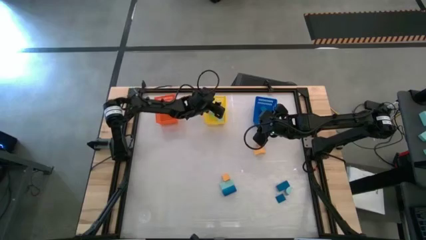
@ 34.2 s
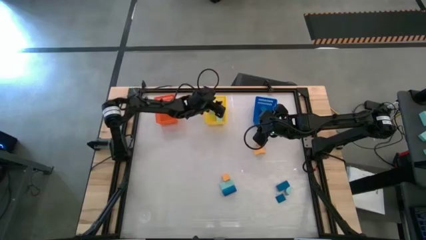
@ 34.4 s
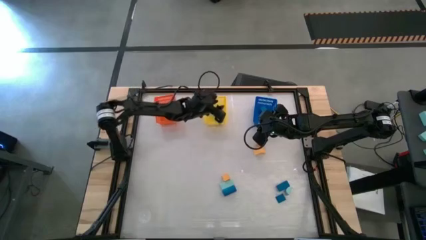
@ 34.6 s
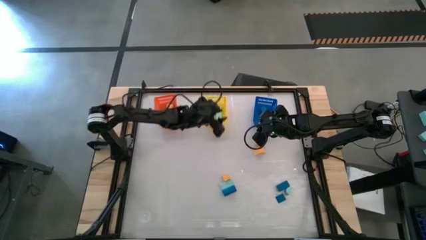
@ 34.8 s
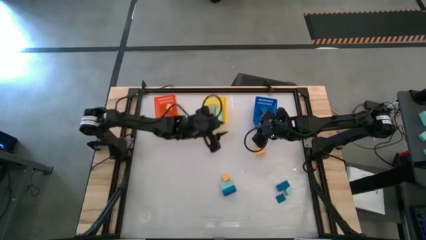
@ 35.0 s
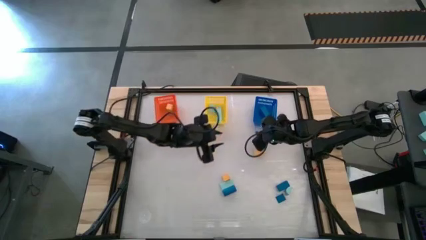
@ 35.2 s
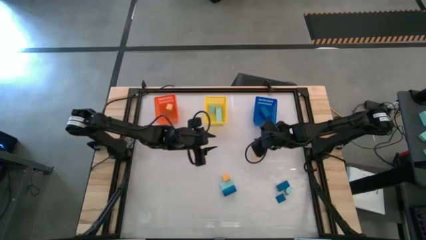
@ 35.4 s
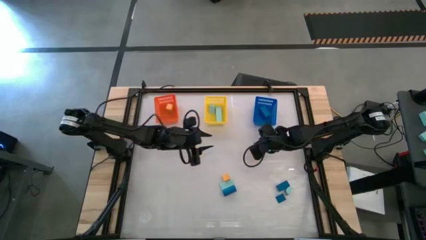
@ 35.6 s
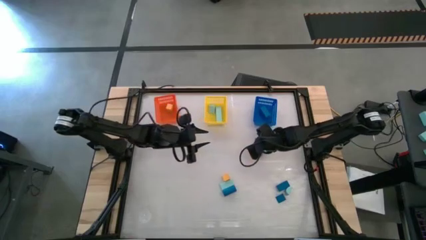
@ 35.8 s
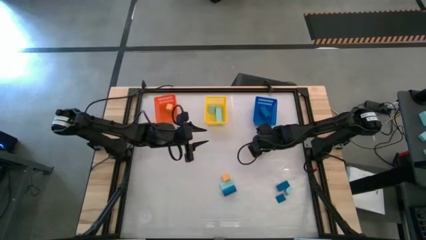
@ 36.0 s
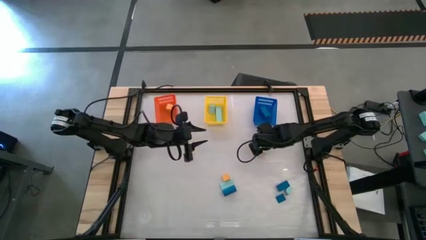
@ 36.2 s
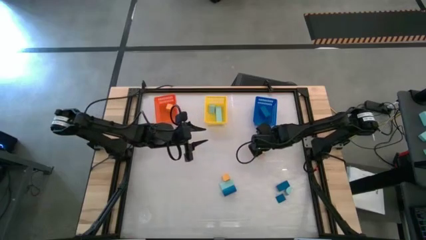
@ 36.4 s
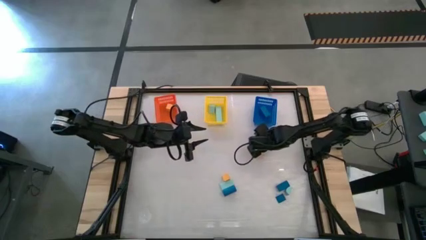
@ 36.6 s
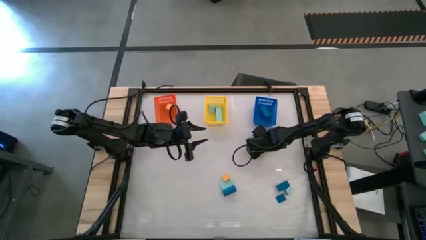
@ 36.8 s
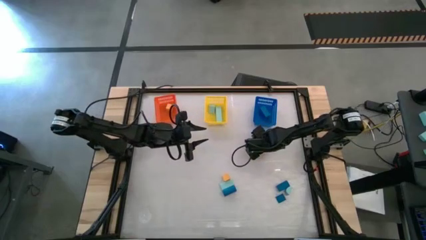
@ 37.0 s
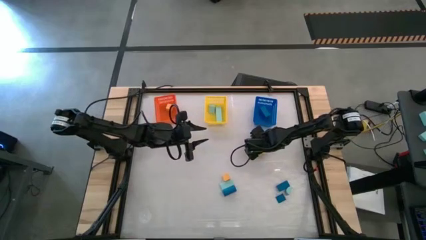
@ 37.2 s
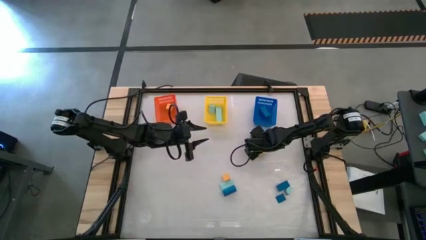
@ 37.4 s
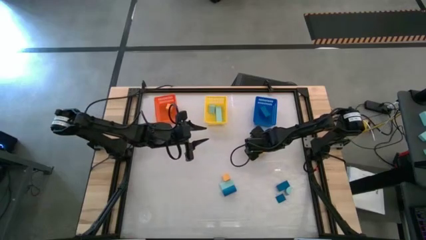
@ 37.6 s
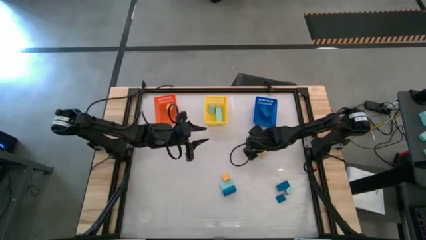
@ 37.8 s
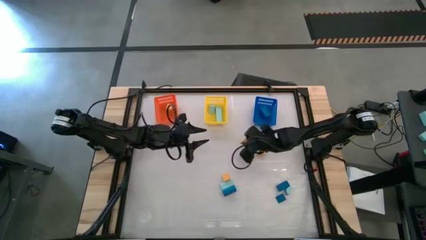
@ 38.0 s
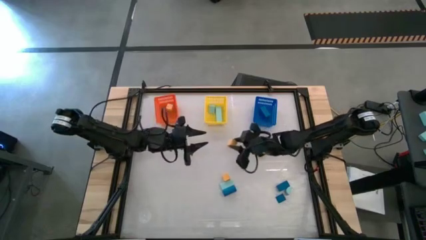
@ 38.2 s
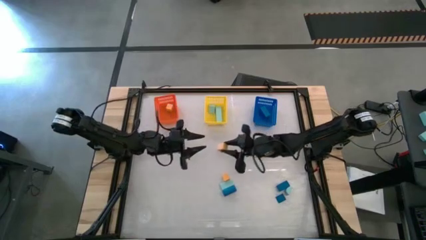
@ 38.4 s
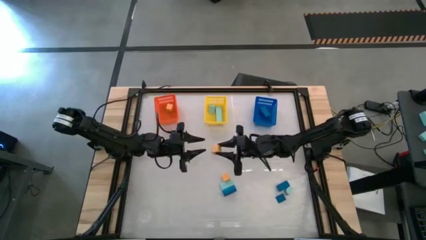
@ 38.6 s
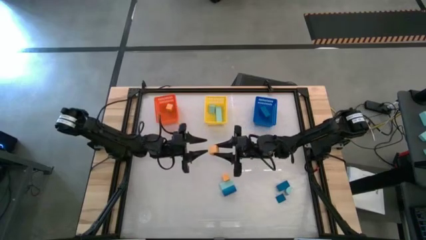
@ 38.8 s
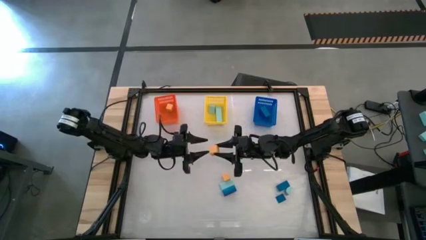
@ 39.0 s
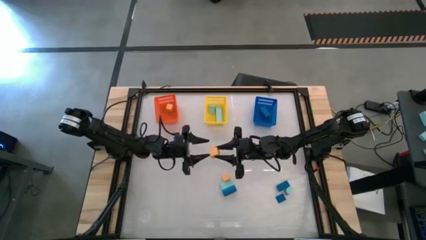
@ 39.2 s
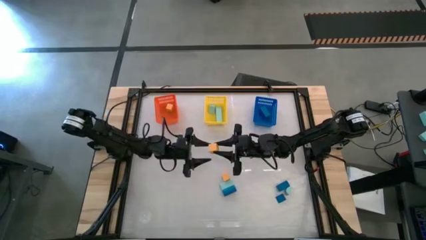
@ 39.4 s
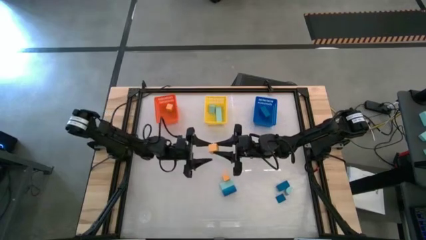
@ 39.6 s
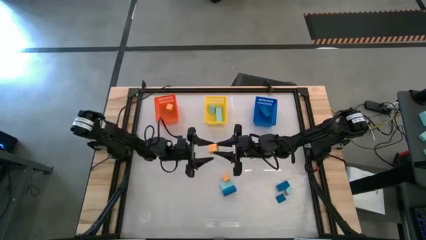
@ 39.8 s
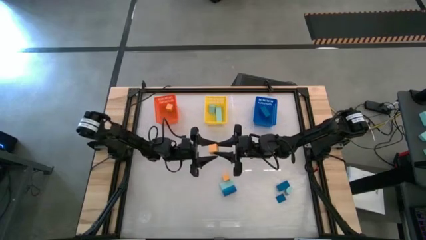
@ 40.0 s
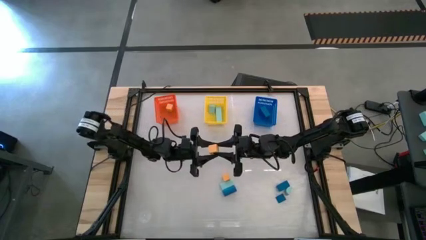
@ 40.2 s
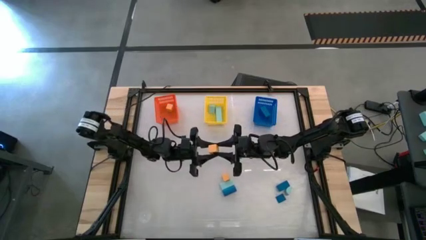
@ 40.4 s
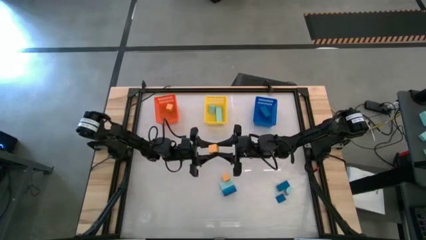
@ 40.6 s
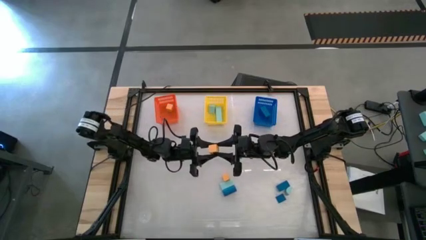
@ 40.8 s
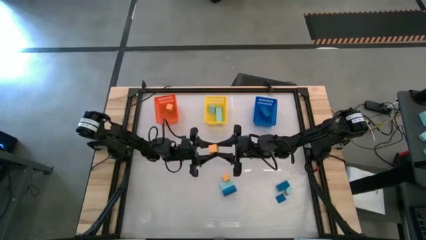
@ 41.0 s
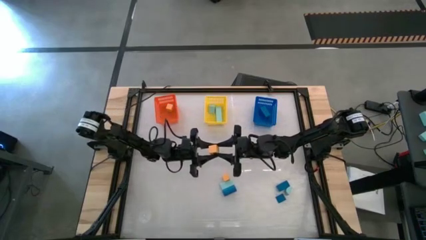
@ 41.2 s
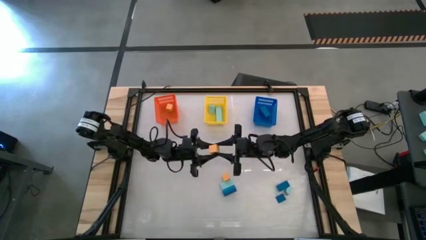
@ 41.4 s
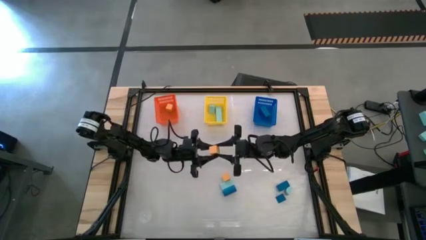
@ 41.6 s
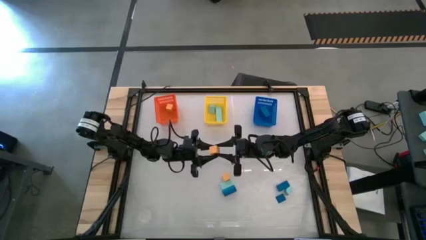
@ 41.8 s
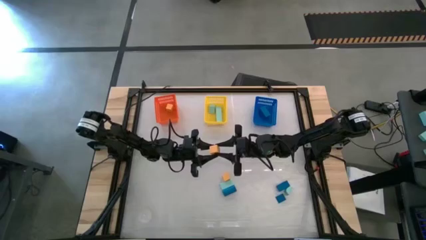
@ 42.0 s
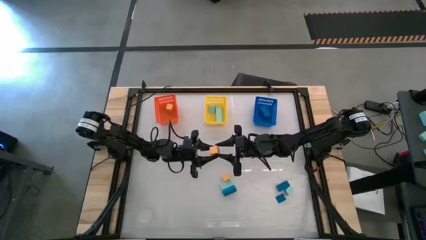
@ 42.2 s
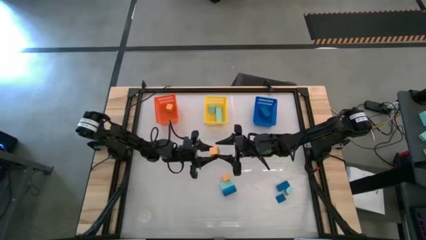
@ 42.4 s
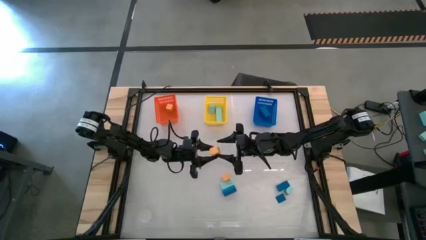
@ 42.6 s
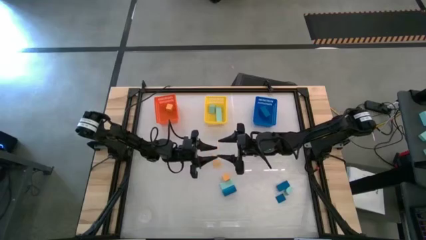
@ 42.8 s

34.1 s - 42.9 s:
Task: Sort & place blocks by color
Put the yellow block into the orange bin

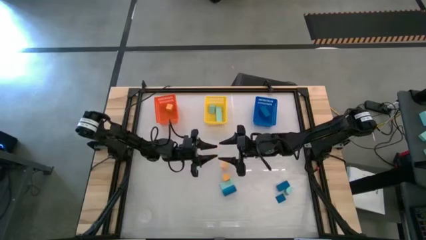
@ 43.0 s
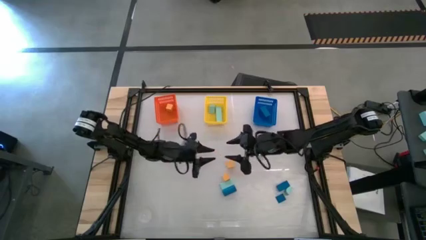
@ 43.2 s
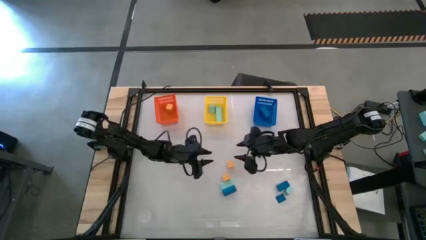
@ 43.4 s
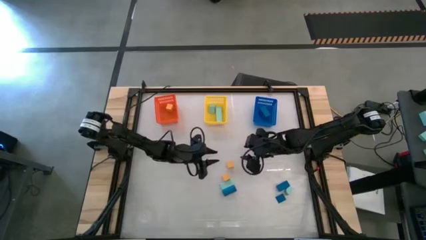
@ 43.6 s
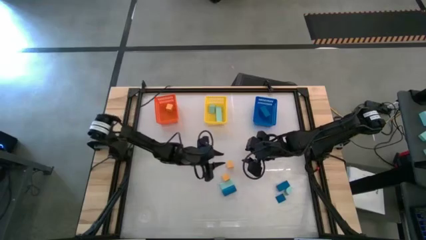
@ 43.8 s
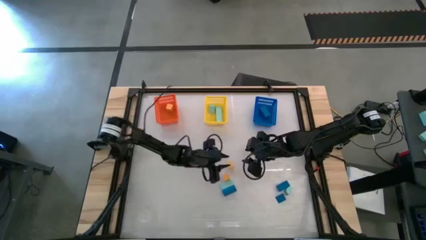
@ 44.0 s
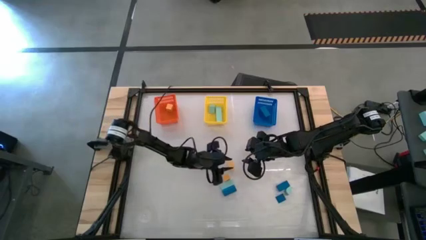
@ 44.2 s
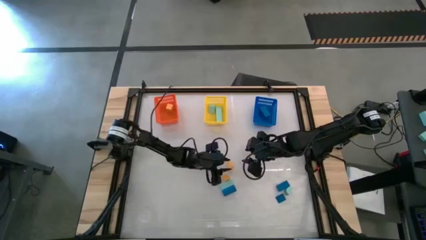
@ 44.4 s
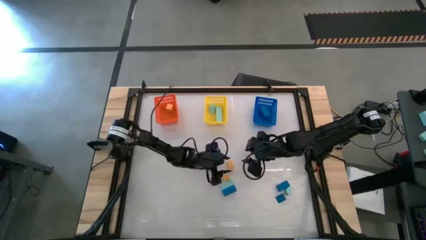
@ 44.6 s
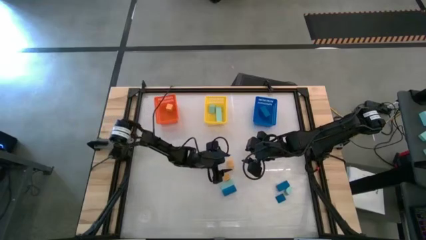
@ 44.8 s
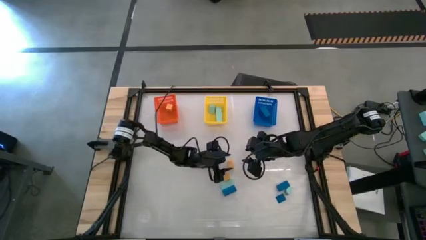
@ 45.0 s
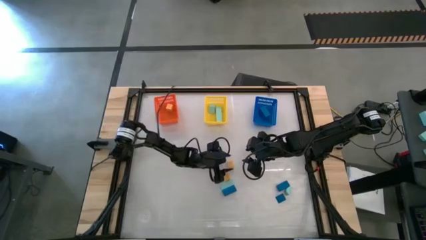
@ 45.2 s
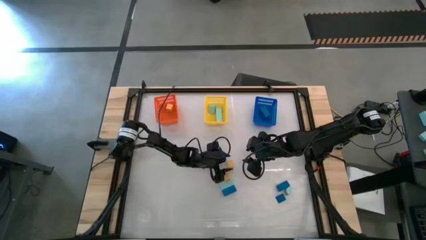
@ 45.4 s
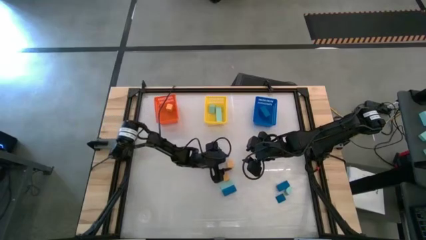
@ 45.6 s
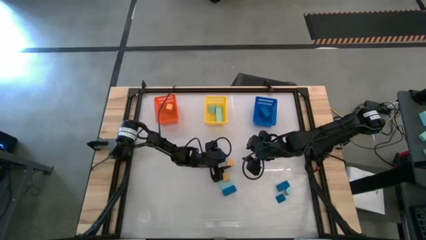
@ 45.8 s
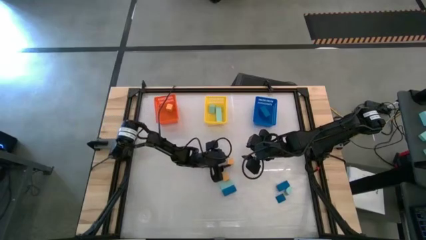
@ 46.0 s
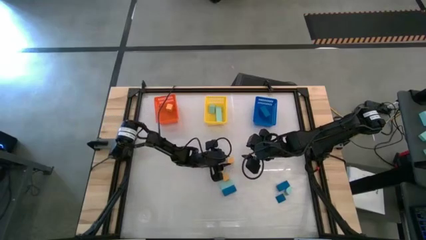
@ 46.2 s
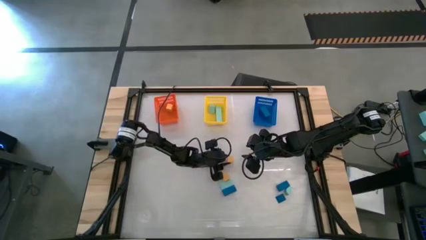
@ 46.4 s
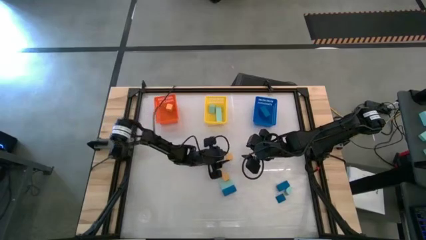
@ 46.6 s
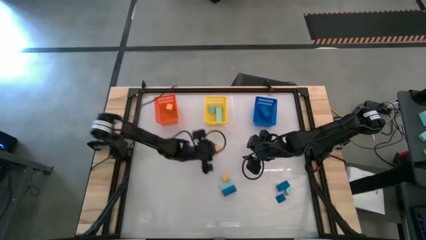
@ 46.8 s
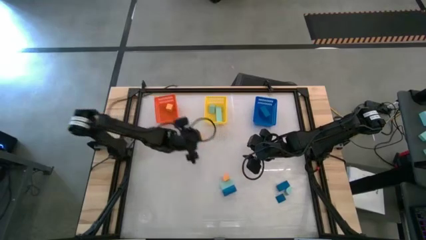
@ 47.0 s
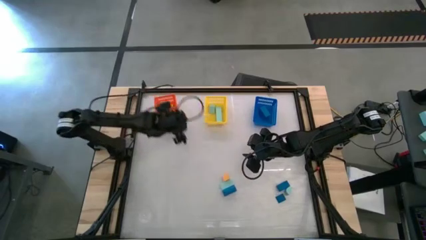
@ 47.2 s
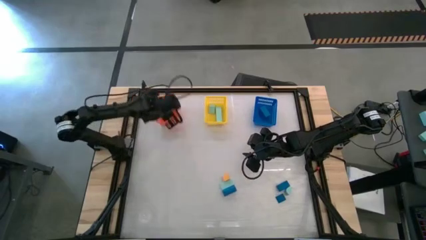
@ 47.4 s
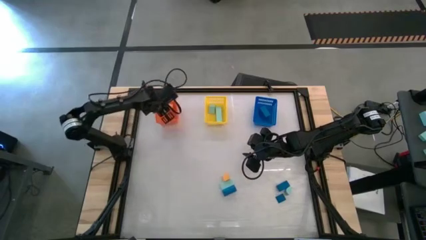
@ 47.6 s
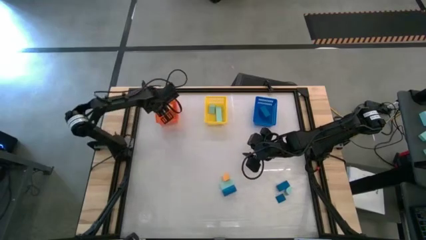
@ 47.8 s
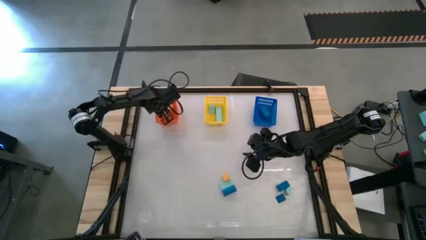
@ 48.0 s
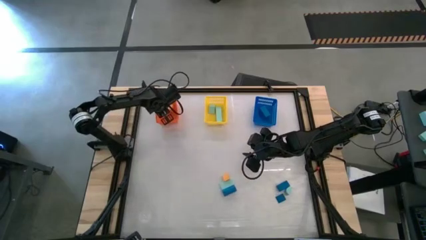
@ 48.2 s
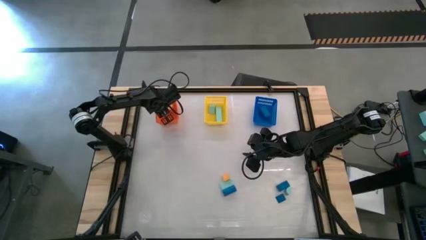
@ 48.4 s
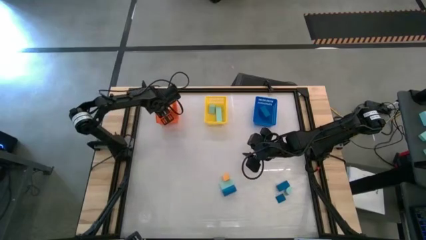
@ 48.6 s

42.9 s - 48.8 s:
Put the yellow block into the orange bin
